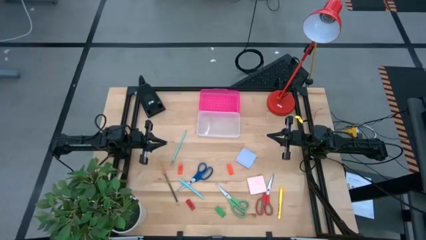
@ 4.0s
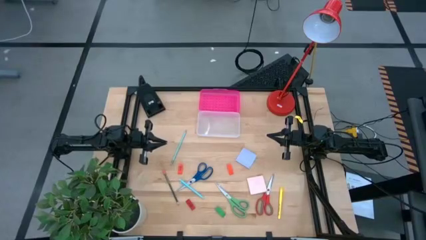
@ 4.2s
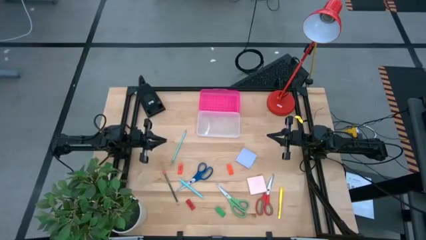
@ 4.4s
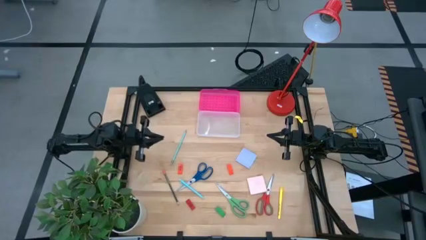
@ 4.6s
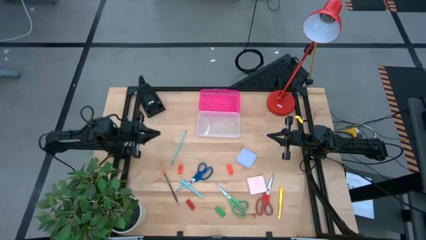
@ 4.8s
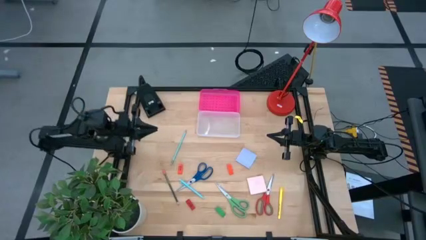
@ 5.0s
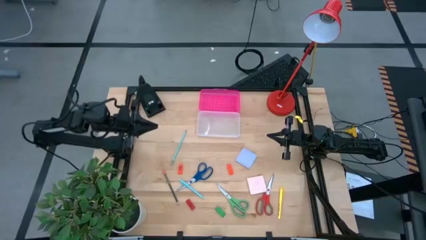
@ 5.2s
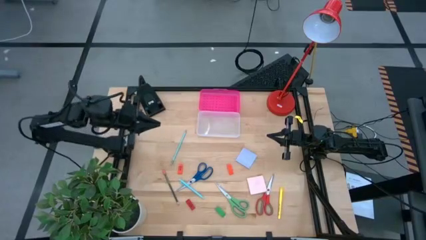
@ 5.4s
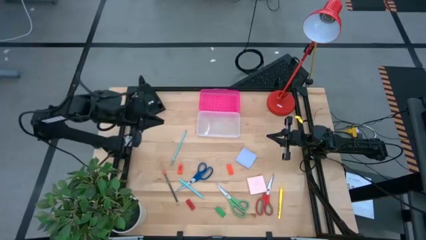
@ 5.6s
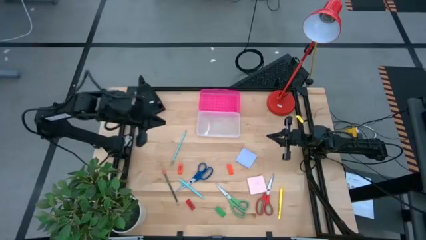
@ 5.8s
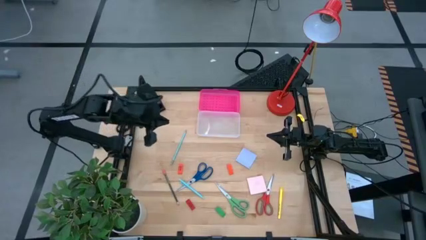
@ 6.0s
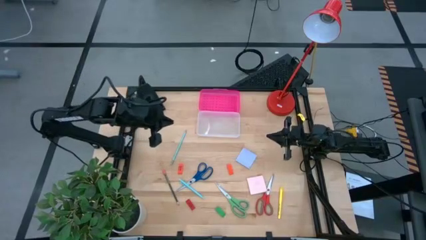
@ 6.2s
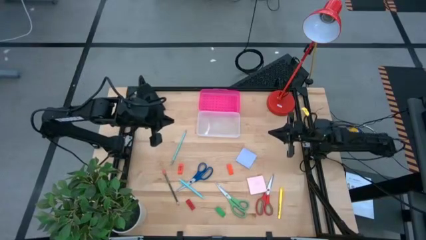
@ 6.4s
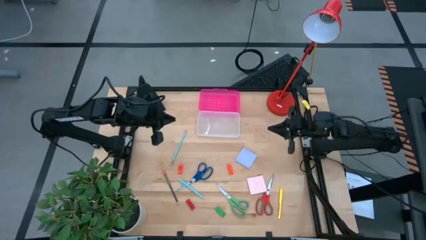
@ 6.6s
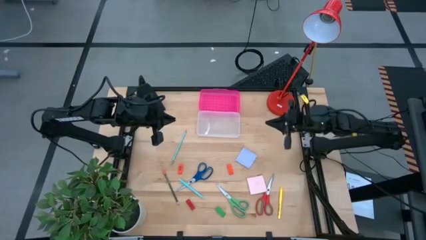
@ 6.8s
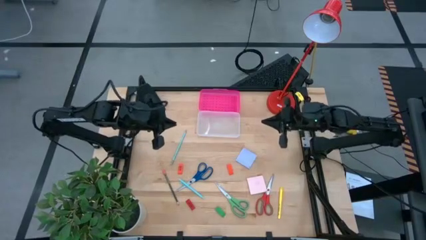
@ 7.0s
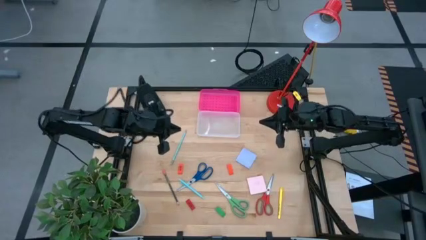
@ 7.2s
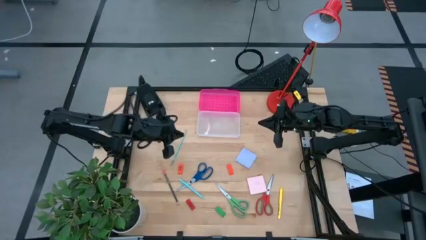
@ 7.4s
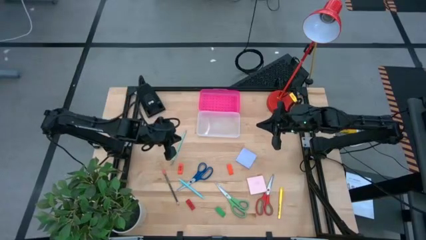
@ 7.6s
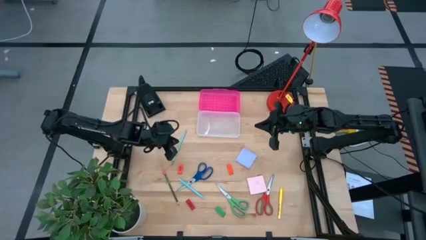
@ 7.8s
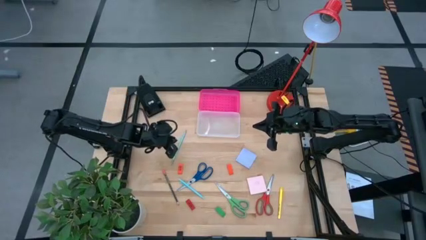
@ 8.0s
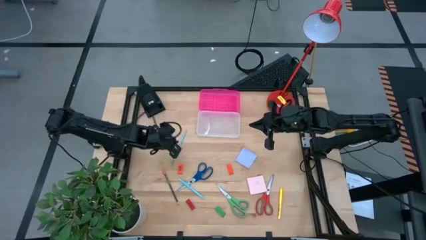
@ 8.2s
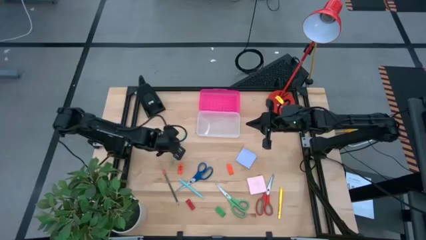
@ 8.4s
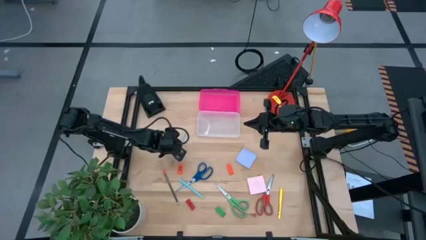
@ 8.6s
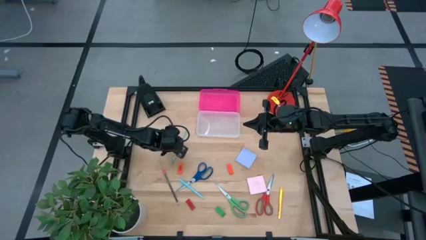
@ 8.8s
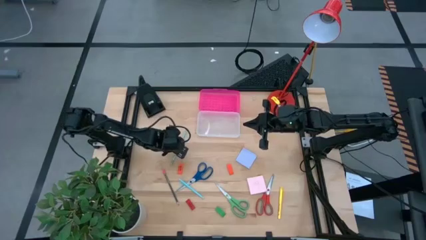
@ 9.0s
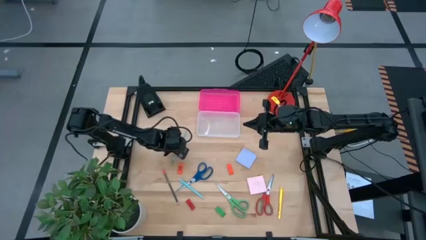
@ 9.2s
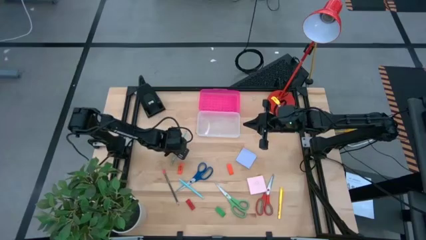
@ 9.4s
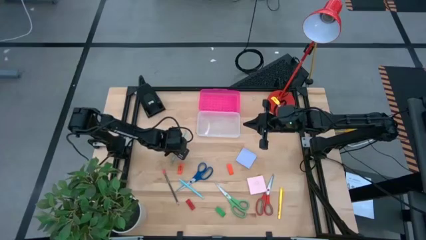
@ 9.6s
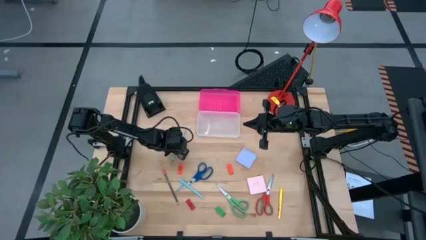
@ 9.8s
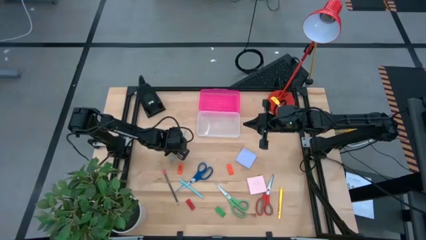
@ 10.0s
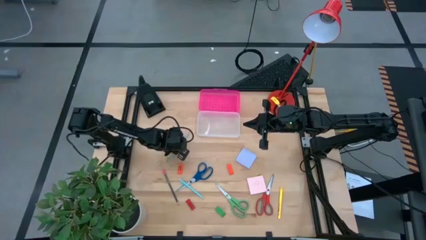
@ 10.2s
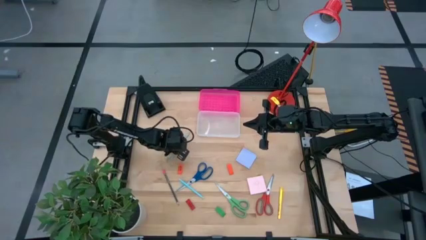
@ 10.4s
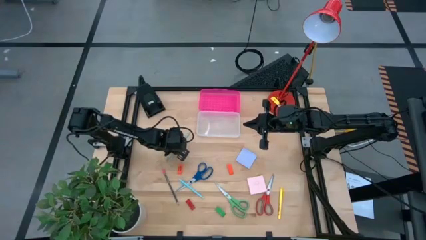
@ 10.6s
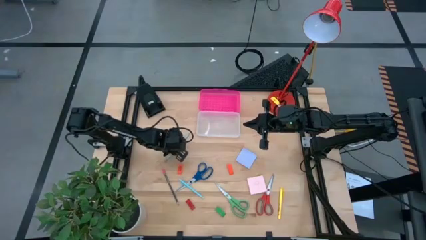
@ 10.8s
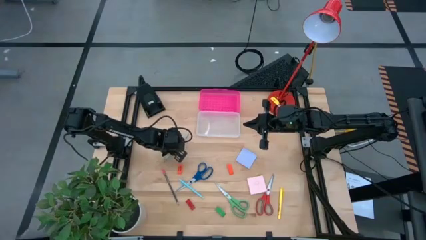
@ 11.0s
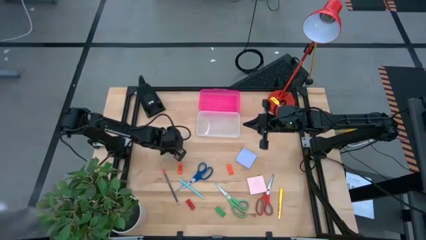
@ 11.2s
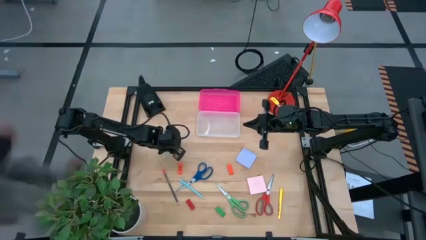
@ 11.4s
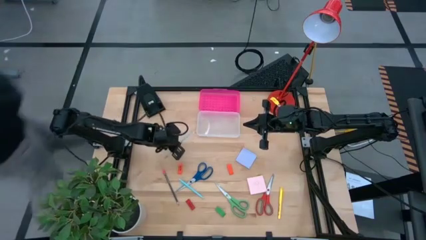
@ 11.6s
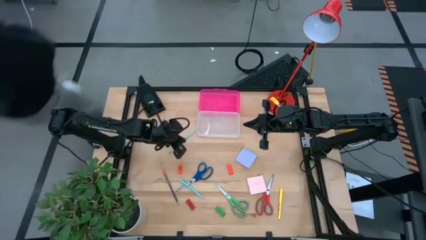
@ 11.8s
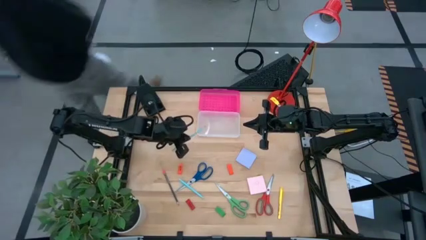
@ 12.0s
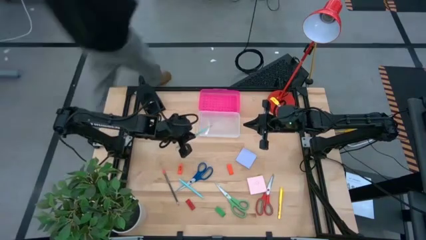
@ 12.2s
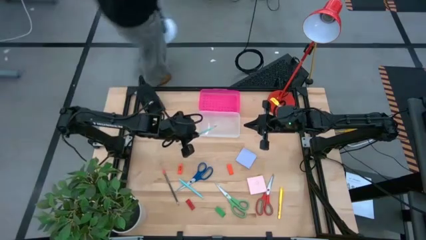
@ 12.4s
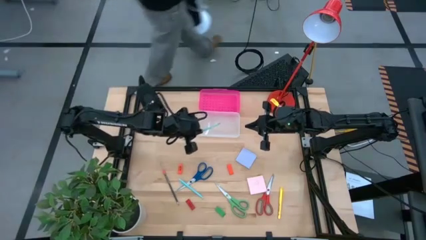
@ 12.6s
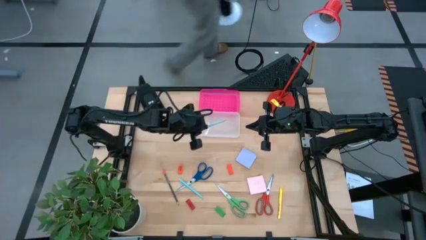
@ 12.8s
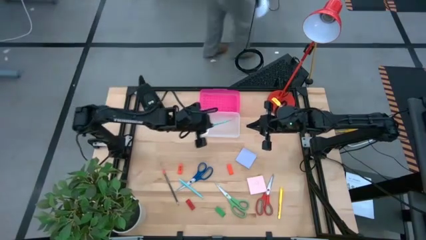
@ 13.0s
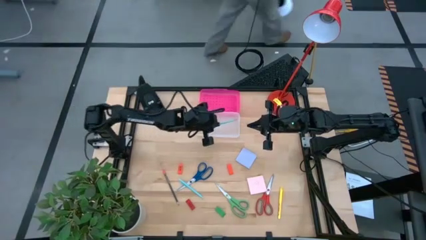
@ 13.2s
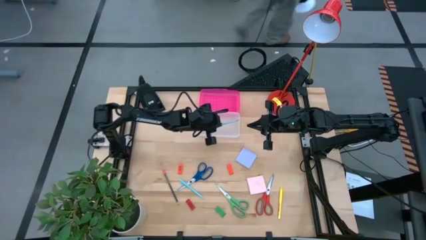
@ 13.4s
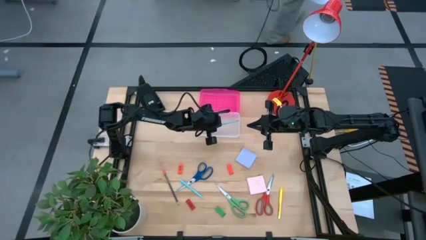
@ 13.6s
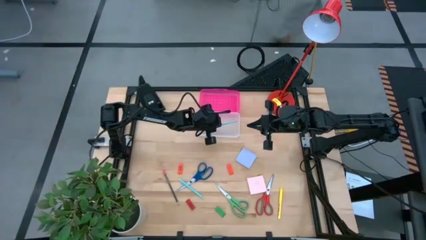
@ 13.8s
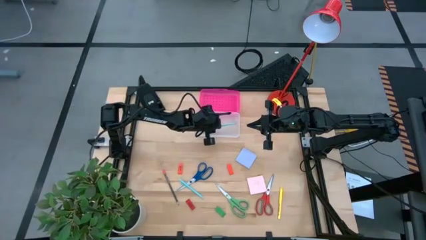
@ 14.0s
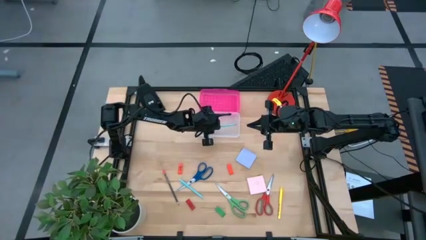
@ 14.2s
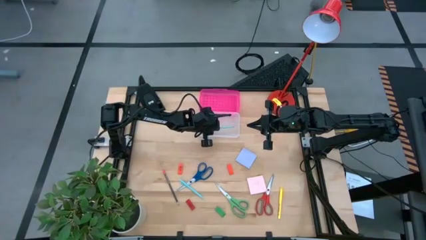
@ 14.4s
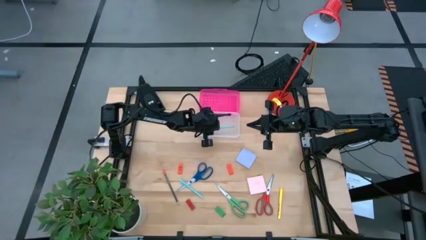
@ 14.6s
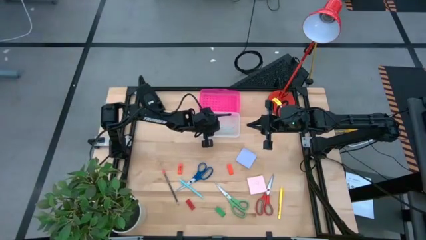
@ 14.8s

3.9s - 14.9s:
Task: Pack school essentials
Put the blue pencil into the supply box

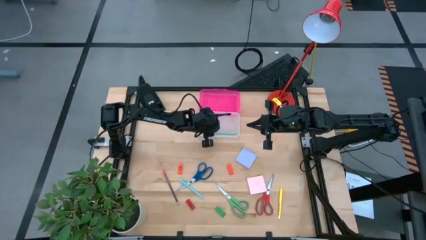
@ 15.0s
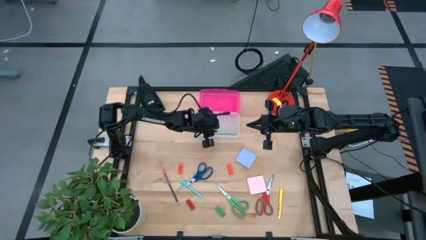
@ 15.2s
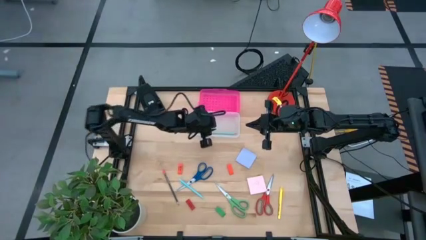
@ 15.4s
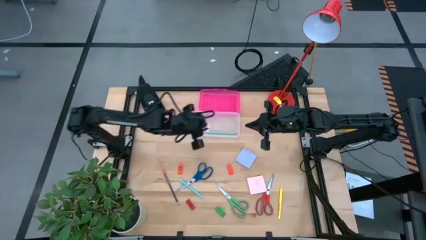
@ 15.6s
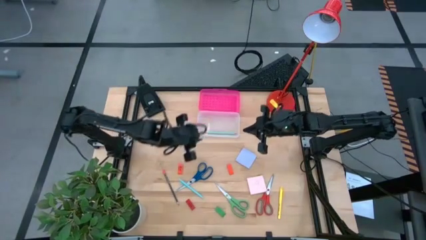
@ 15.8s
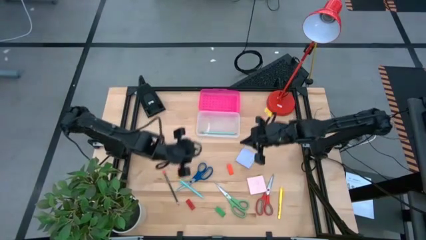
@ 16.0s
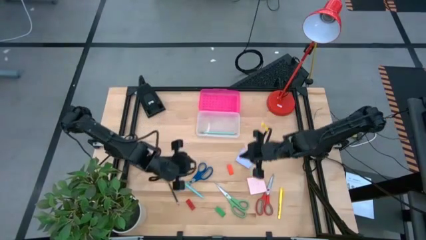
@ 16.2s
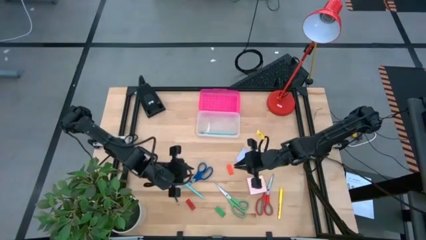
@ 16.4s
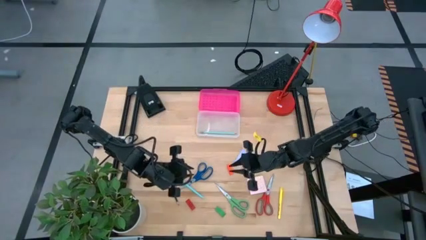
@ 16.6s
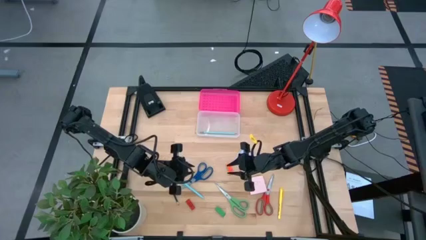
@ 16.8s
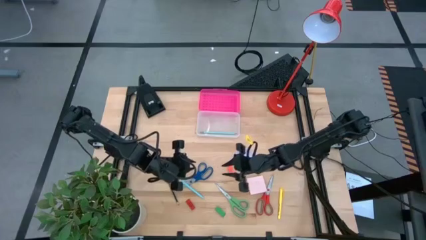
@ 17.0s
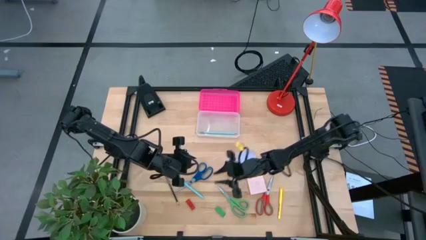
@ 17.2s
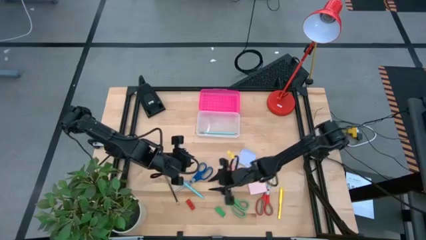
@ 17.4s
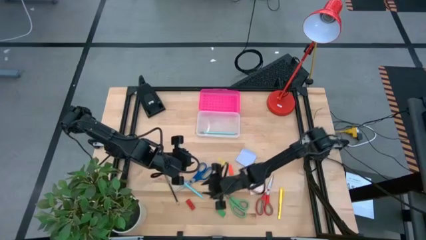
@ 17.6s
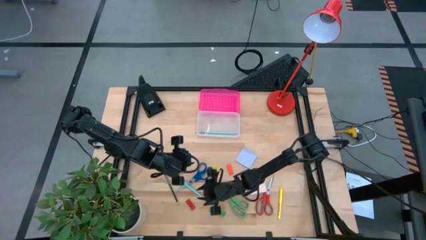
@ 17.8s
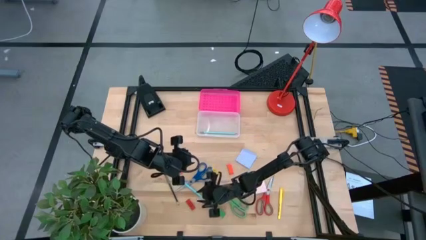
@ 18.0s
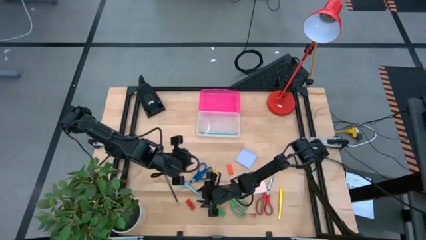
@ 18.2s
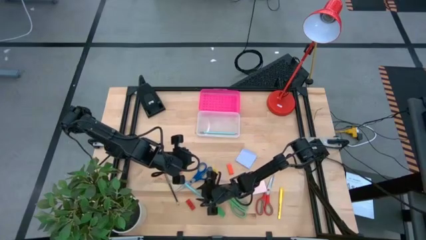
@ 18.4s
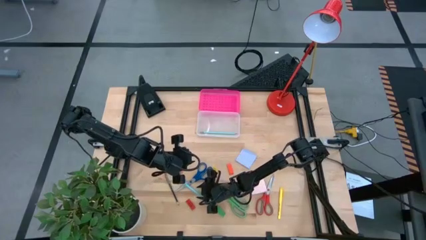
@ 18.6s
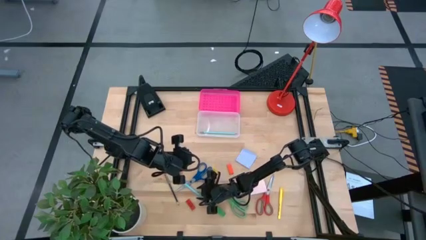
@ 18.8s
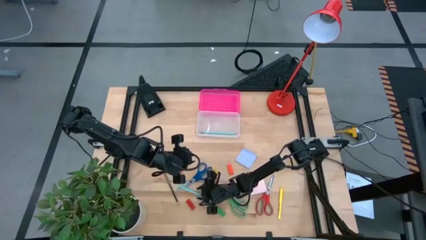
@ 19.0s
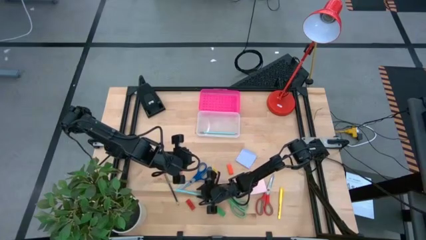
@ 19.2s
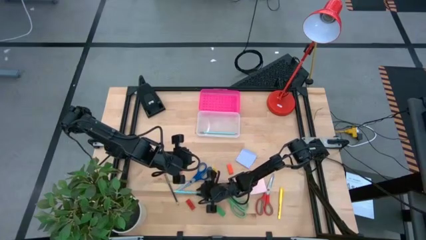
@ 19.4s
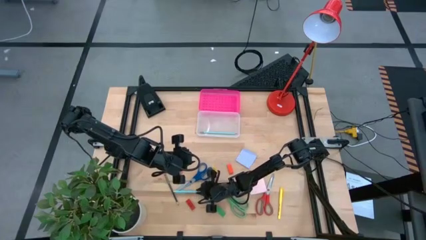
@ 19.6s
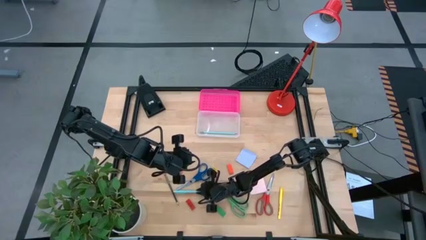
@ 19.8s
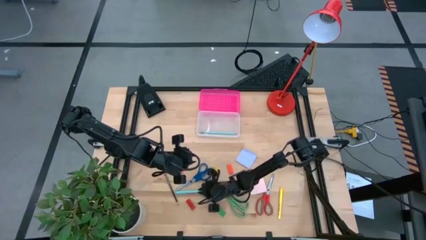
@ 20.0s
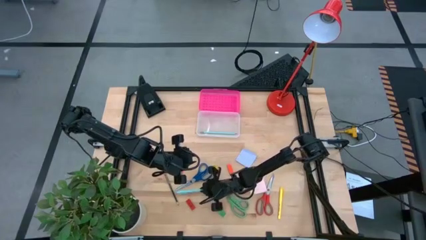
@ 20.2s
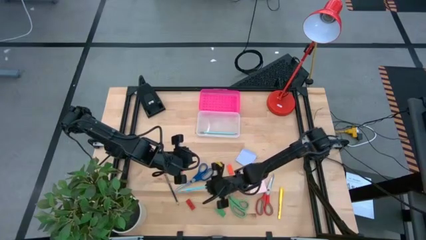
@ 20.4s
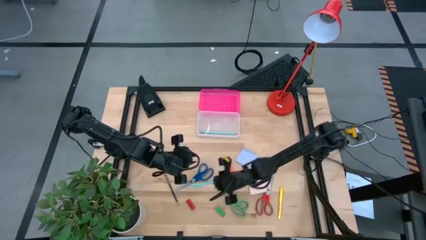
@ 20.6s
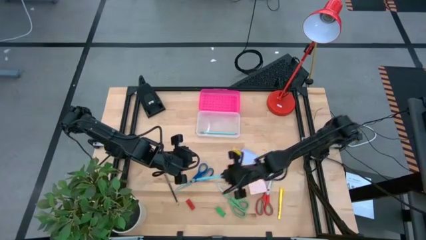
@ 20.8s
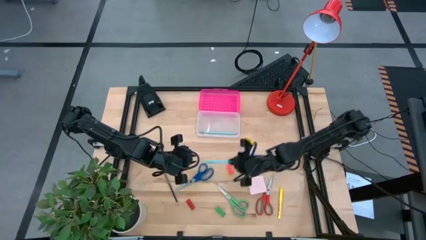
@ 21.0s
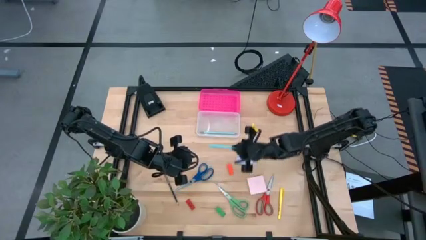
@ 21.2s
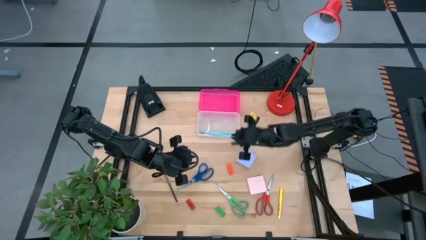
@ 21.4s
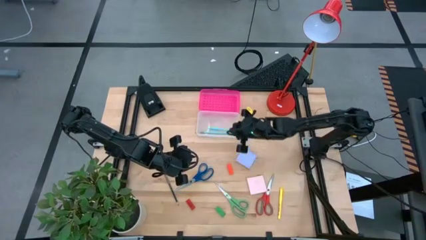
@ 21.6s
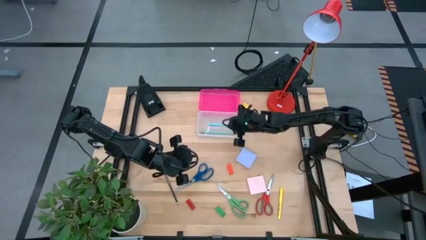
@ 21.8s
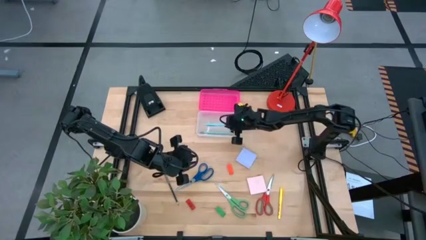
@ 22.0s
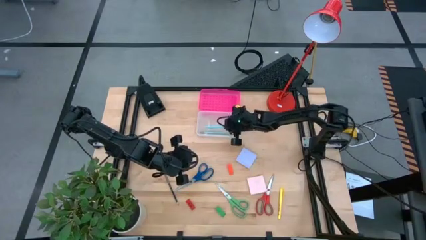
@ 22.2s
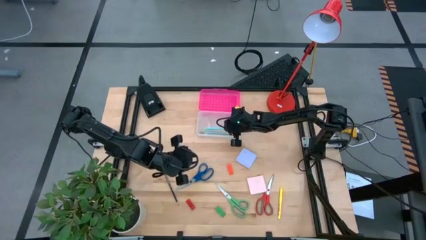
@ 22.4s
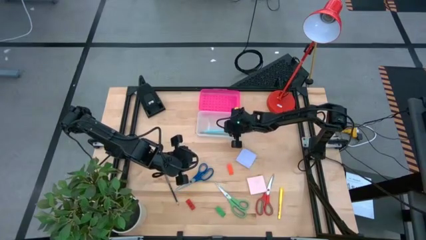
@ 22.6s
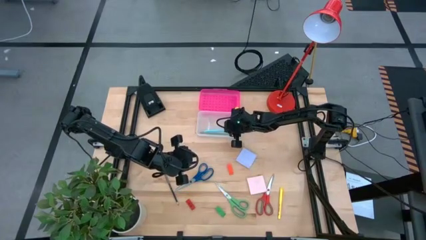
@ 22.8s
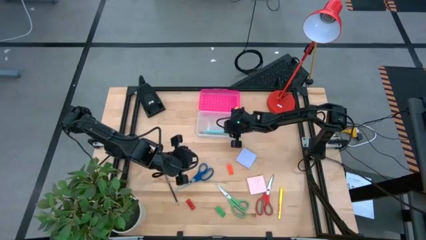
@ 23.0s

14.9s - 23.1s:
Put the blue pen into the supply box
